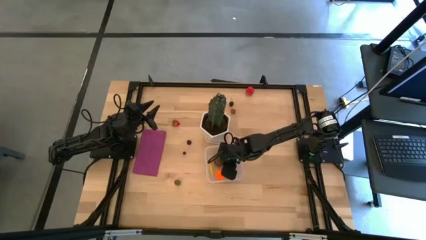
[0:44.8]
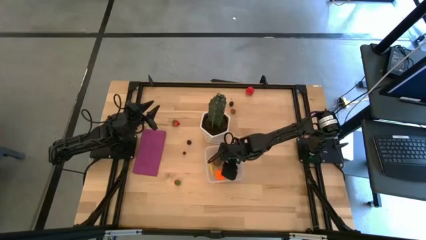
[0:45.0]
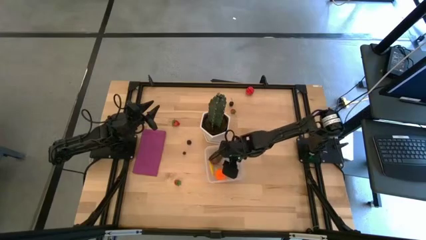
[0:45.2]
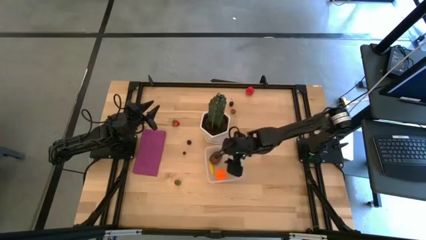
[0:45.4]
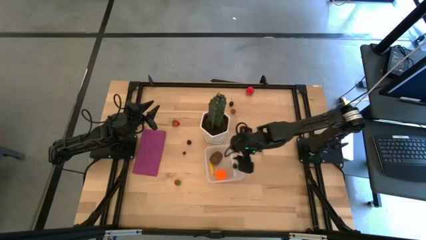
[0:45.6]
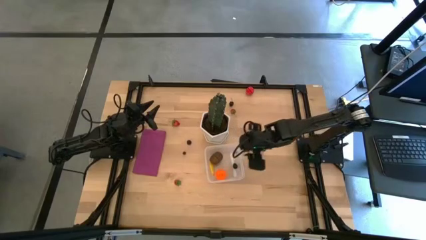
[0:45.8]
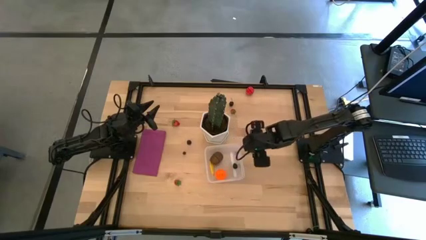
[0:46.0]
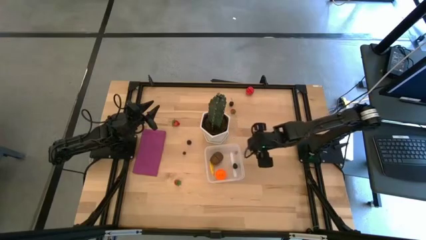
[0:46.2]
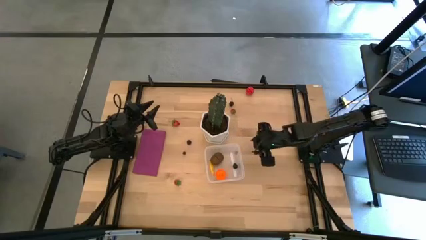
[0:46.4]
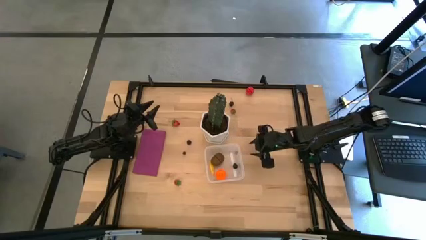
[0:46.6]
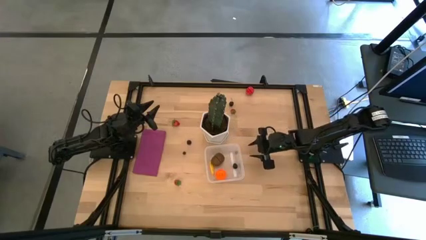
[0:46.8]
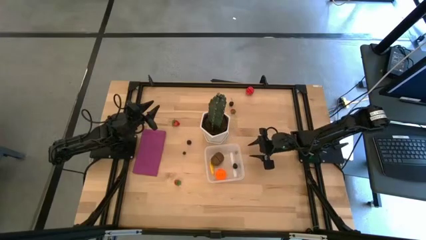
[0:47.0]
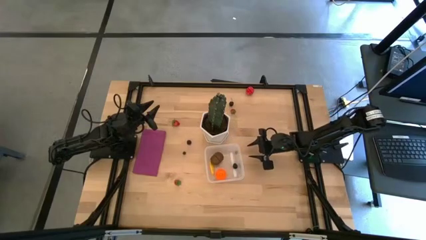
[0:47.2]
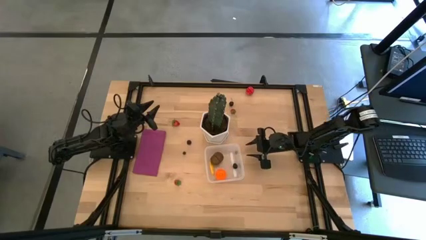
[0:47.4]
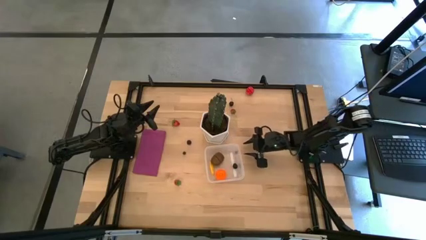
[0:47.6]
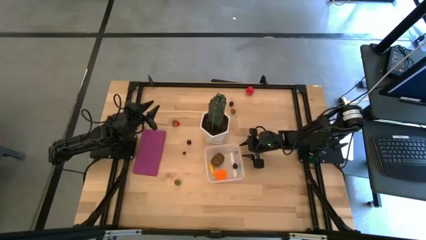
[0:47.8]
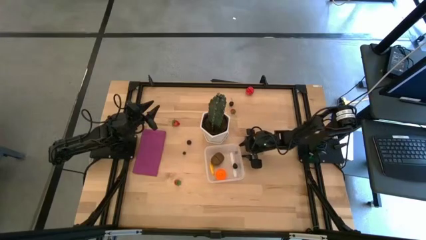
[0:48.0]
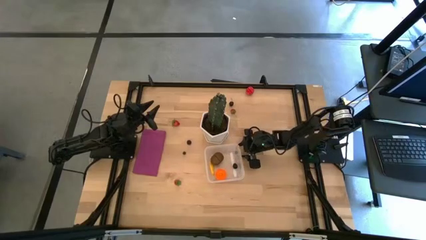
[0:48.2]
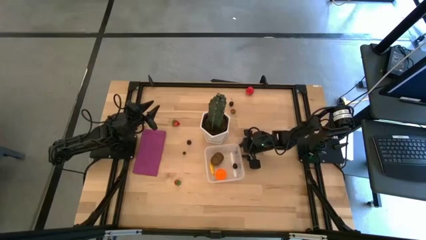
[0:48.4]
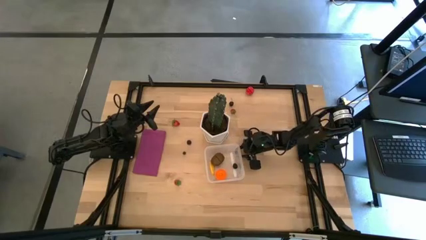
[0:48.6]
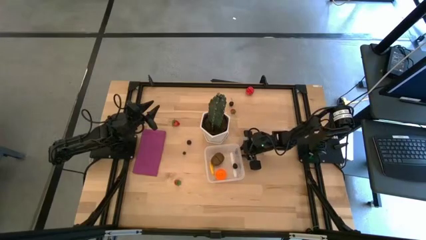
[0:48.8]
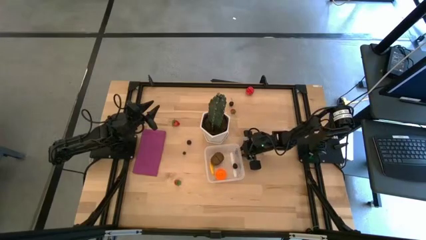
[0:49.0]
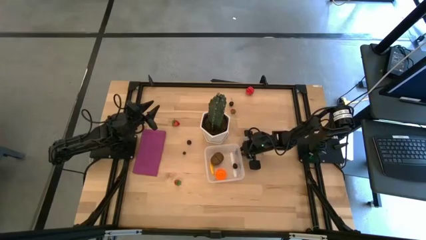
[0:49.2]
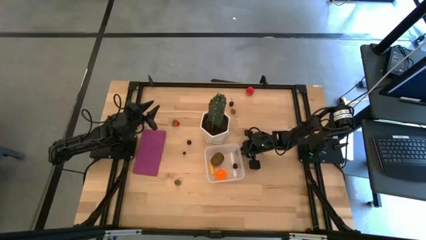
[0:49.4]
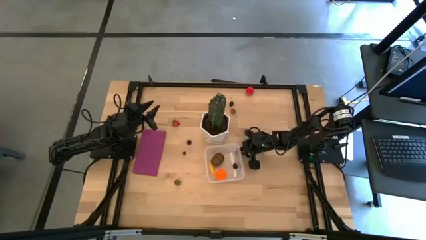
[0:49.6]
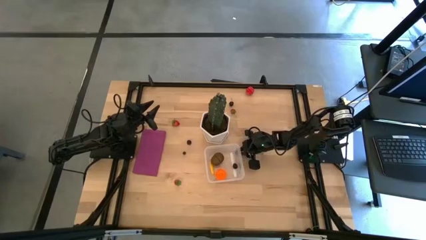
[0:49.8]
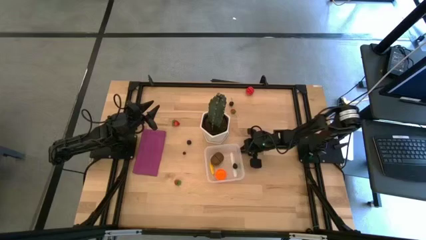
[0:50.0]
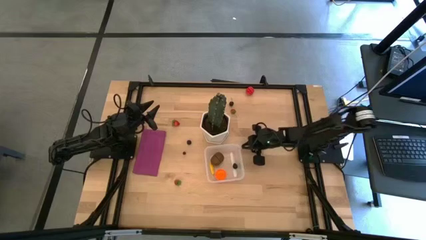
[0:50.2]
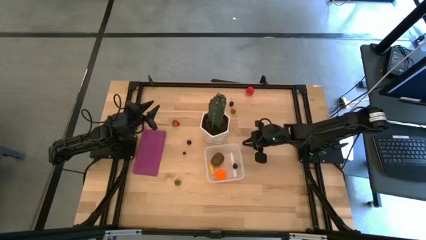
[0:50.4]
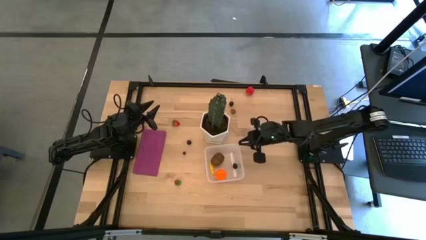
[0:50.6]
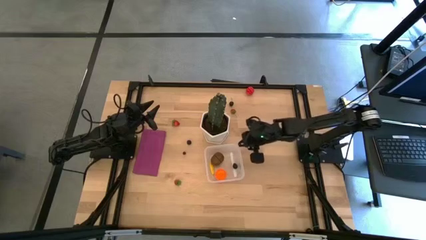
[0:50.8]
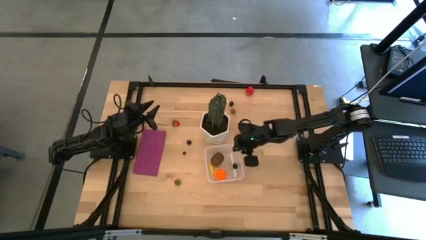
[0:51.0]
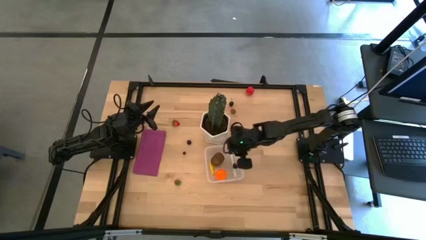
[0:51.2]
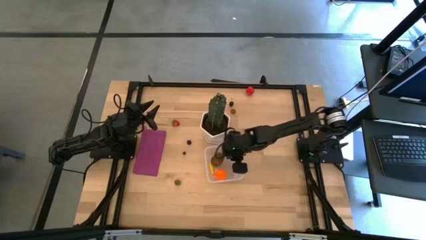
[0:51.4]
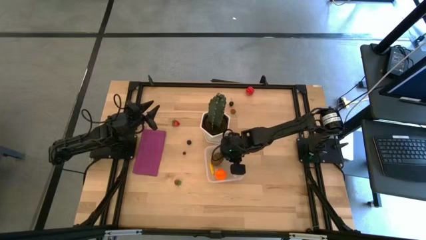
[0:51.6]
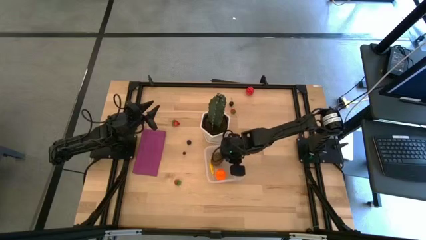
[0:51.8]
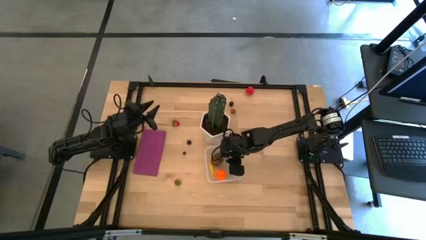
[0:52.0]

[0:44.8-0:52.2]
Task: Pick and placing Produce into tupperware
Put the right blueberry into the transparent bin

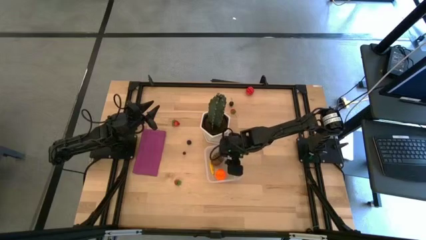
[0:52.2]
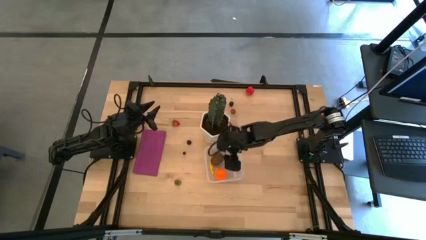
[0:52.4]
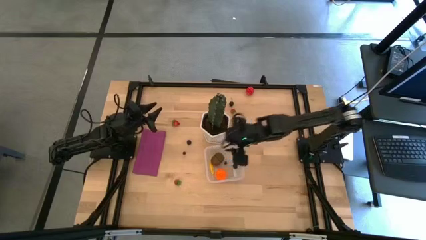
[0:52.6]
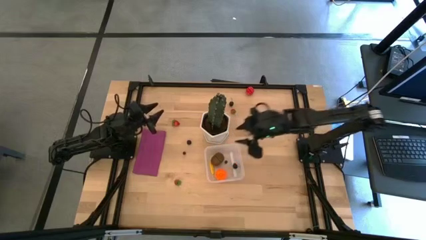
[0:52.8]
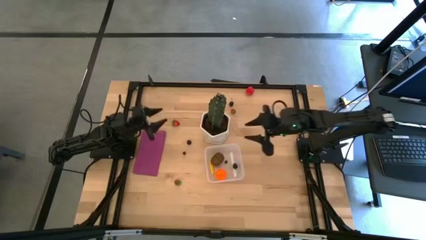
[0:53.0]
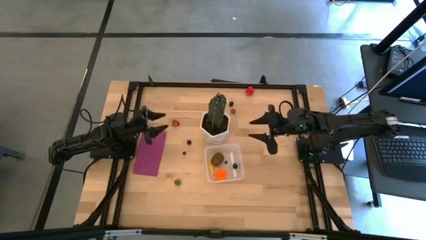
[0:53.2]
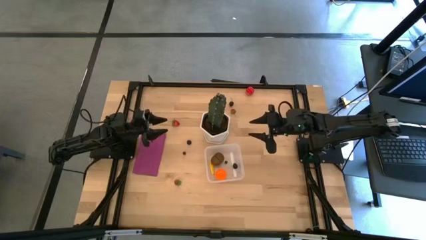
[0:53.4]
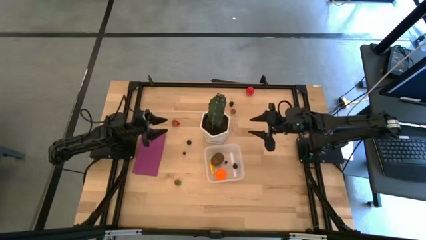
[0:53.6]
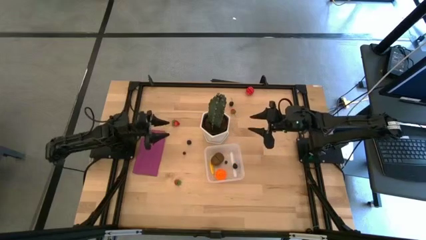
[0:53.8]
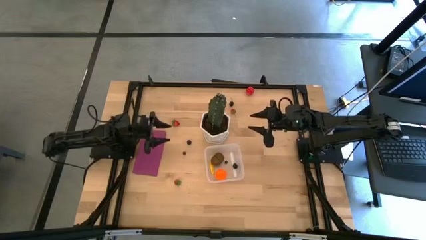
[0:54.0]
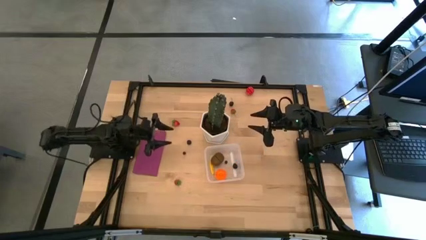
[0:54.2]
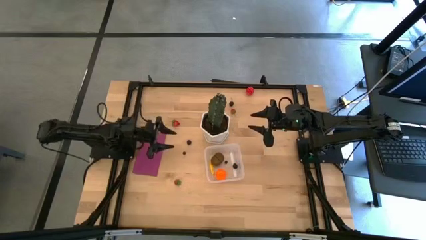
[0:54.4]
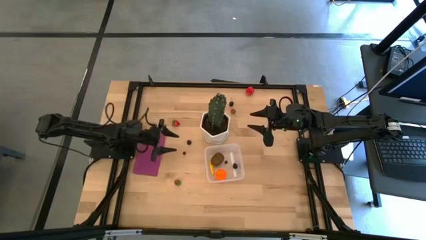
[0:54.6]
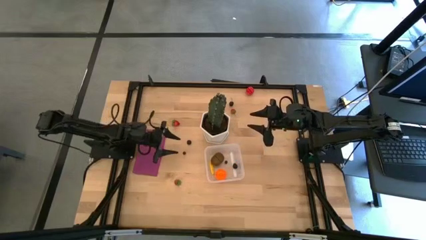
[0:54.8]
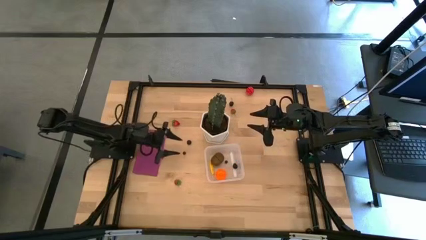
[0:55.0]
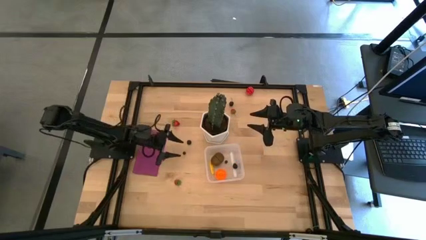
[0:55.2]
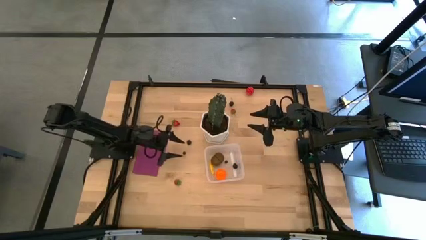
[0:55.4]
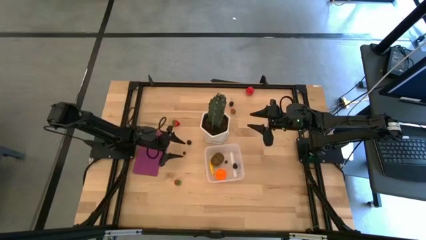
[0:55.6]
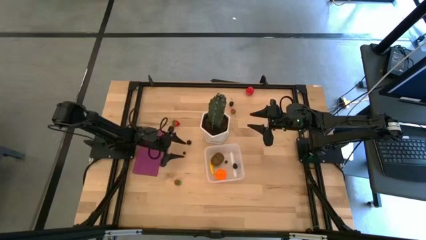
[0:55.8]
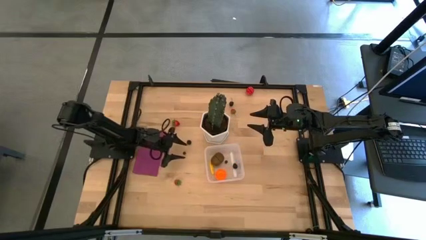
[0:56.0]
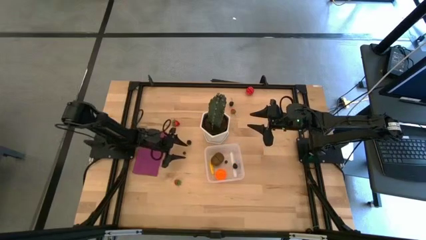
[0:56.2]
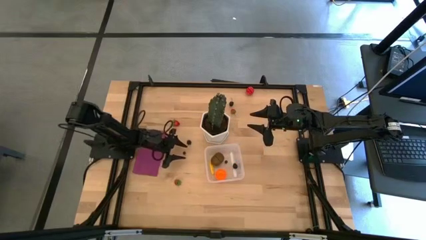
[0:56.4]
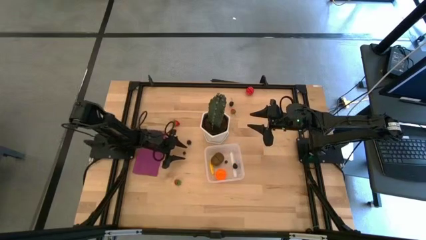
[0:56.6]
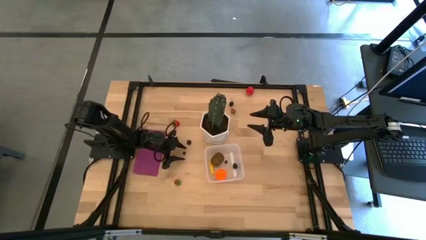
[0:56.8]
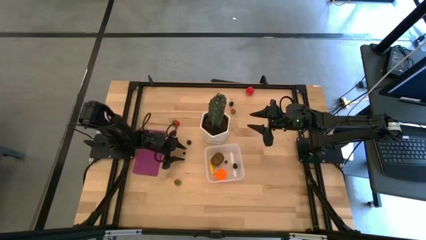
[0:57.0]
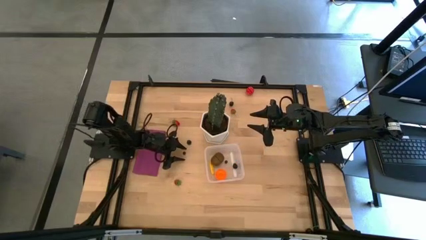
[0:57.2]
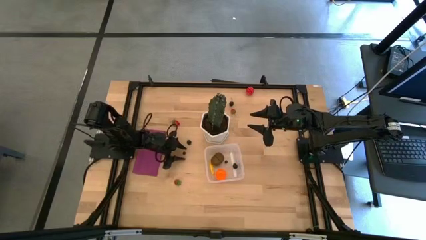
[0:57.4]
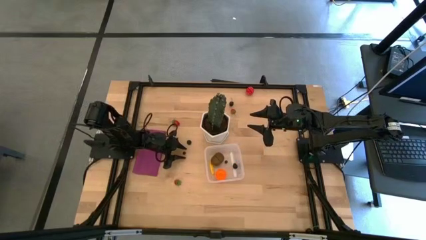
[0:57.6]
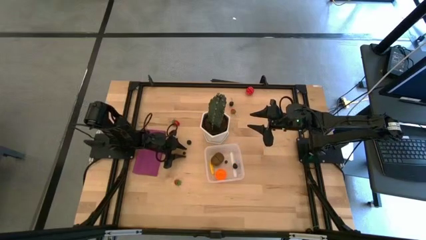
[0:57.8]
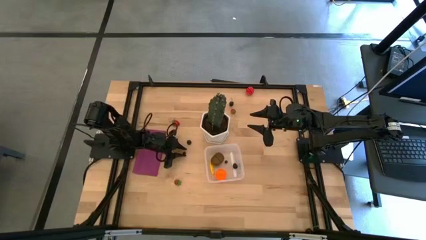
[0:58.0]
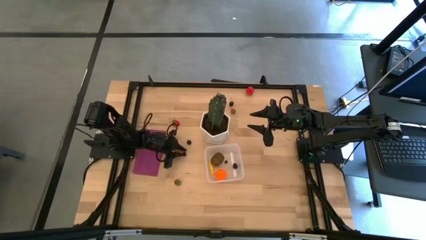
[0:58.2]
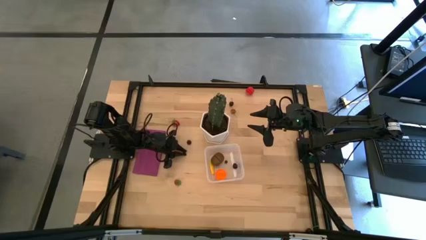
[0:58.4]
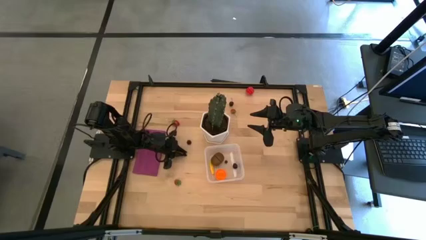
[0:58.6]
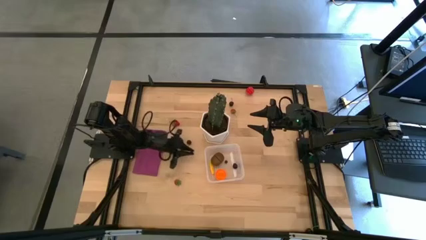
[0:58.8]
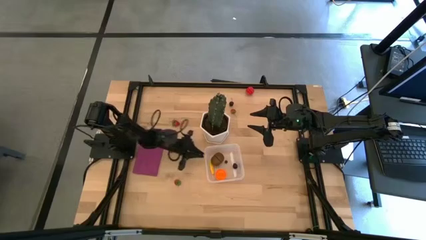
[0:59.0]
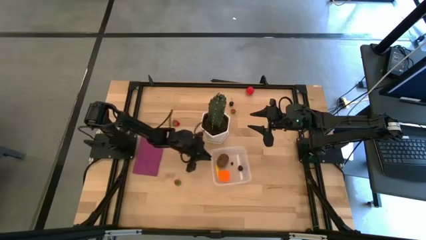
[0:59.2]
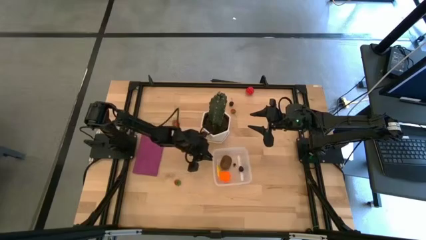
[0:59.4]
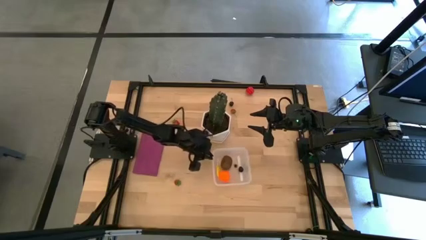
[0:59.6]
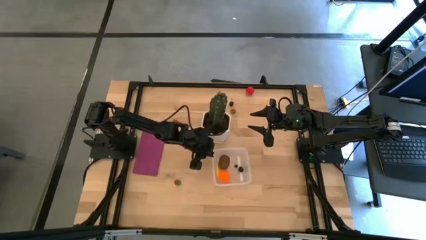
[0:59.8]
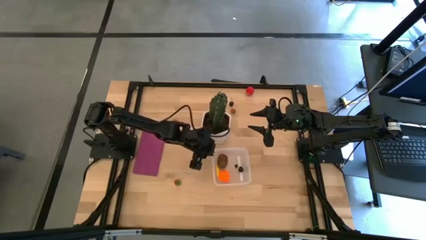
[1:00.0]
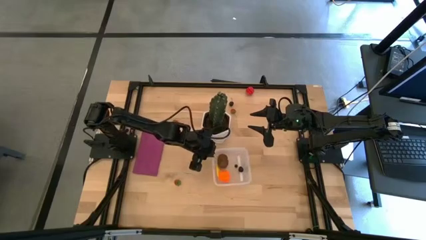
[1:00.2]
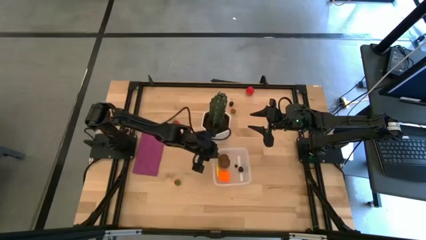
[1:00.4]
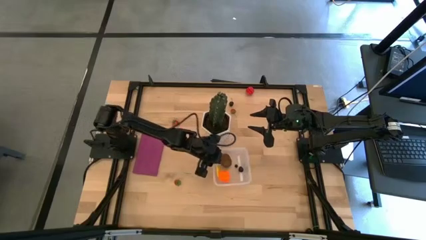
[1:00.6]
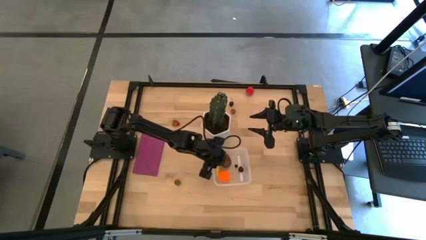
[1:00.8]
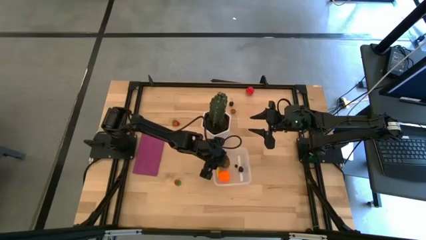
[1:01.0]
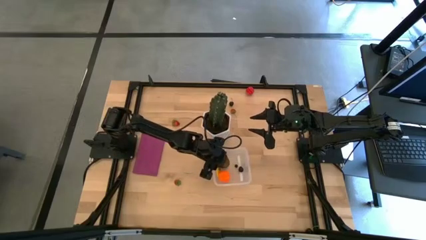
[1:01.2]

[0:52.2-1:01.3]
Put the blueberry into the transparent bin

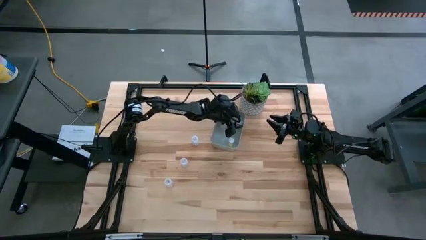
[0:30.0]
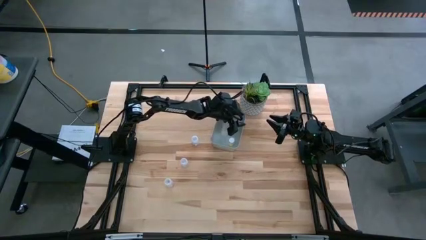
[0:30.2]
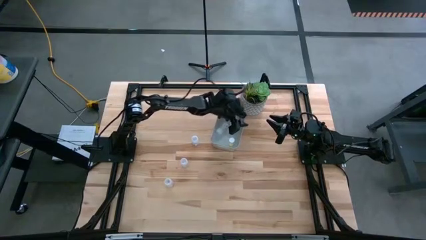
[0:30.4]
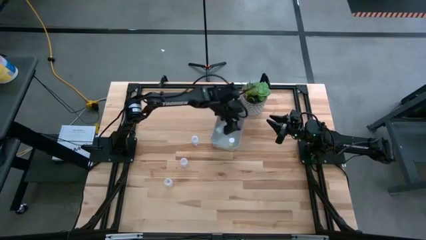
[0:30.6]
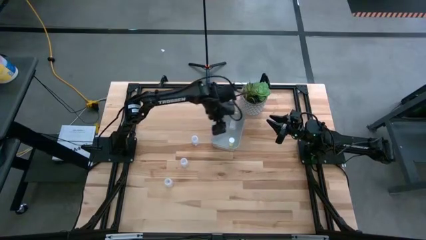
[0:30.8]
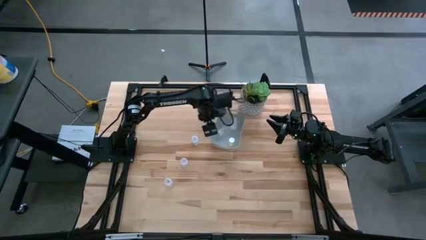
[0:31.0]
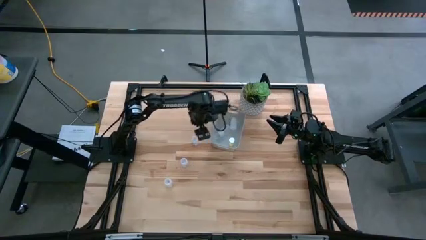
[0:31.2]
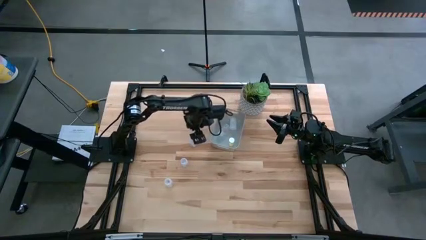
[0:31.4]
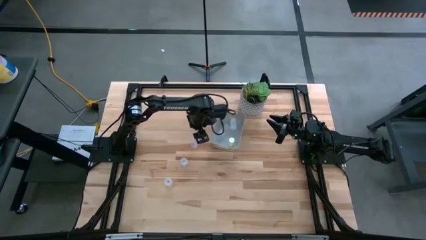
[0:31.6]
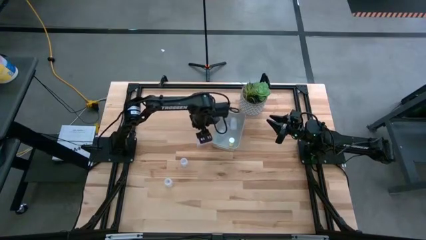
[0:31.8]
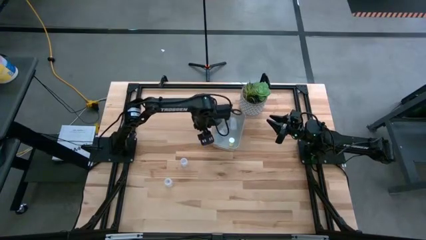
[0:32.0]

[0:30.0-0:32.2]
Task: Pick and place pill bottles into a basket
Put the transparent pill bottle into the white bin
